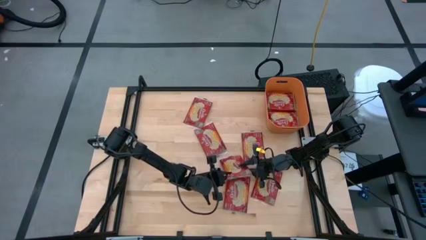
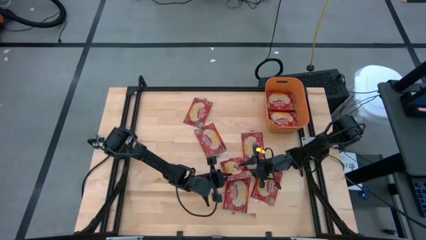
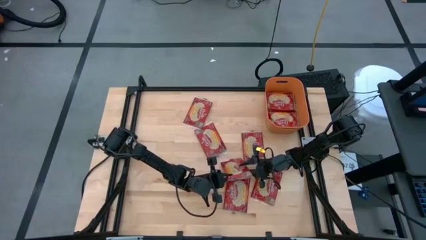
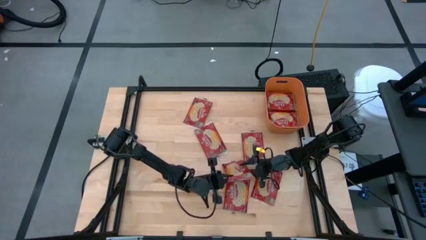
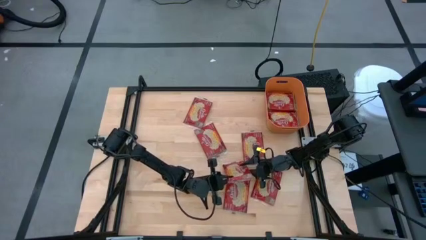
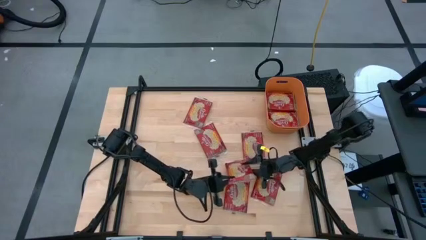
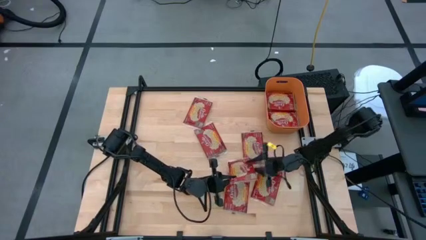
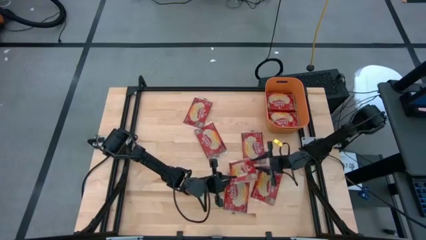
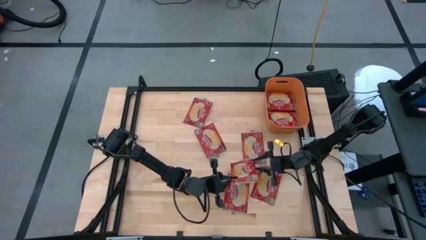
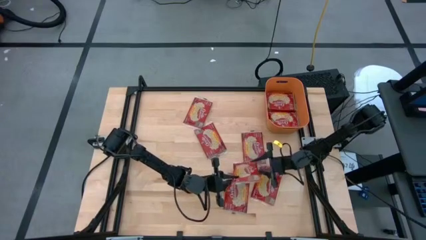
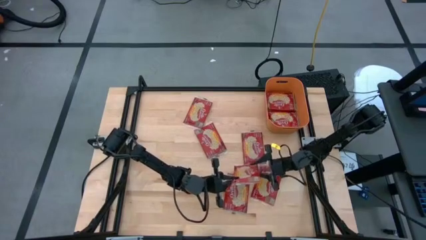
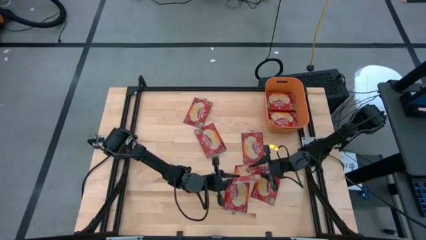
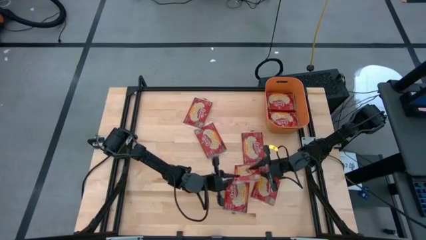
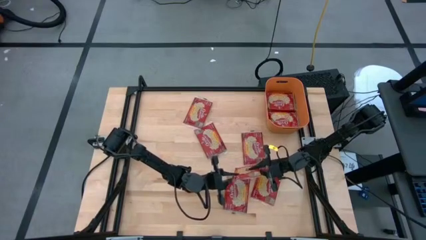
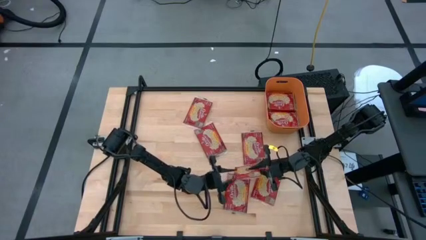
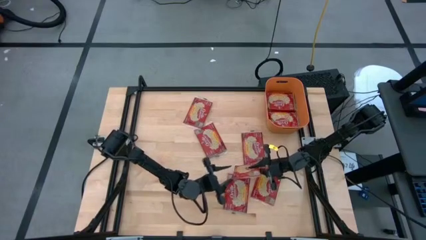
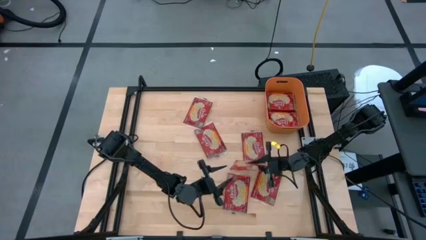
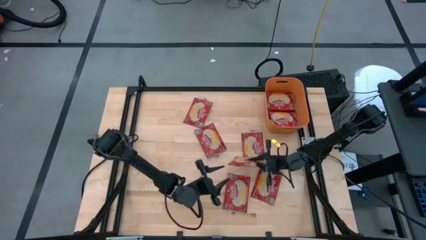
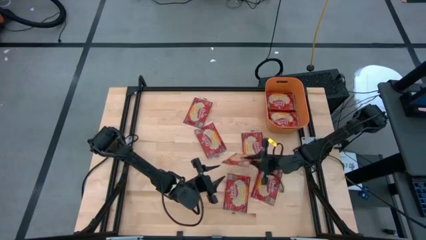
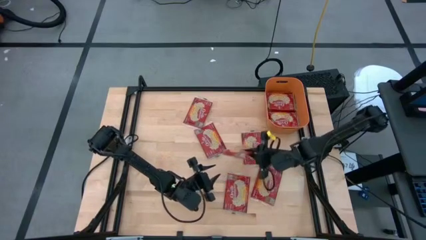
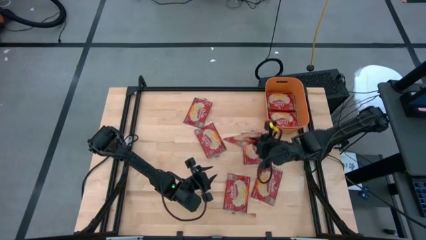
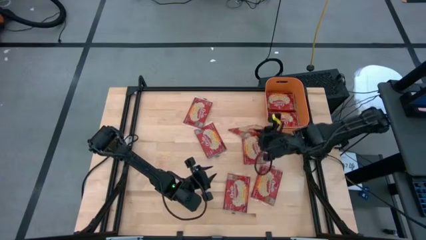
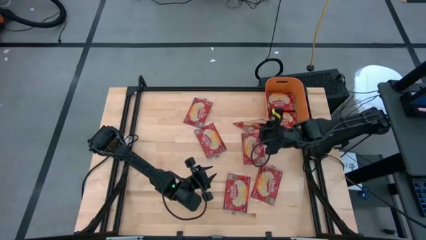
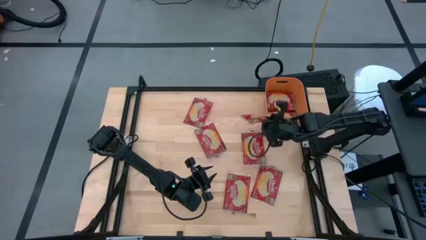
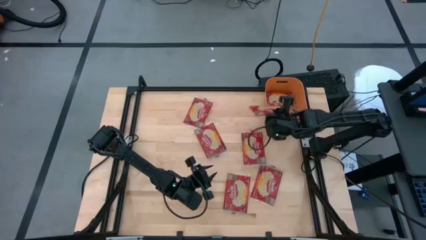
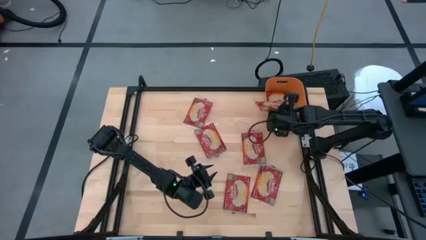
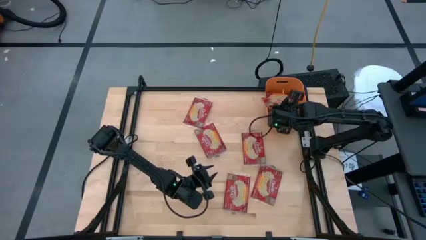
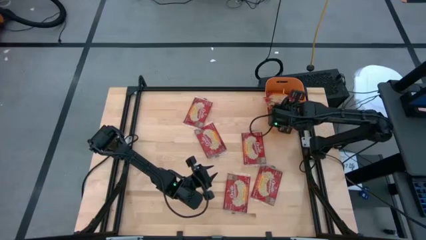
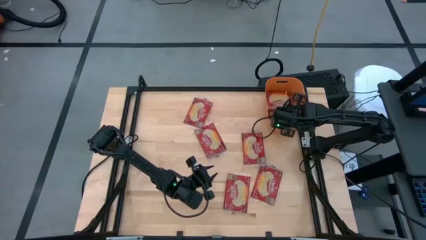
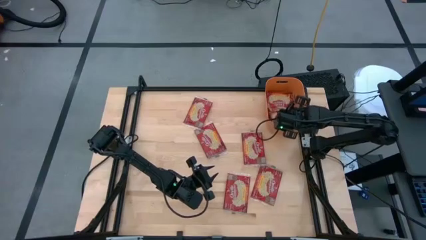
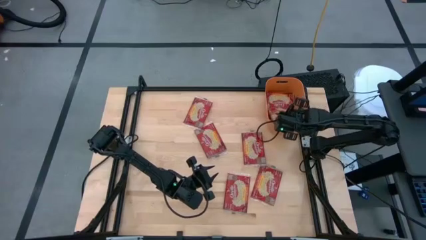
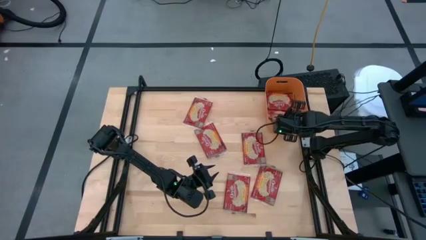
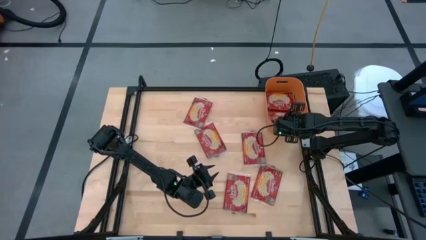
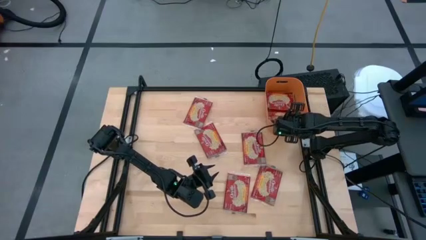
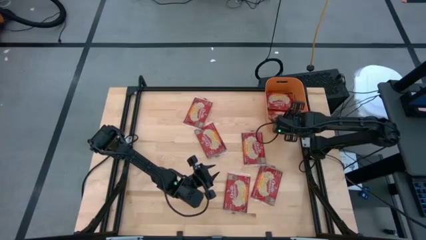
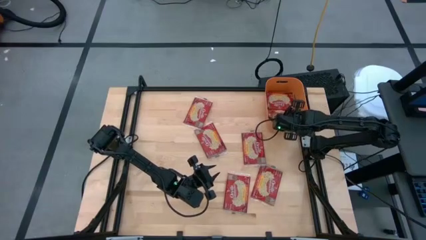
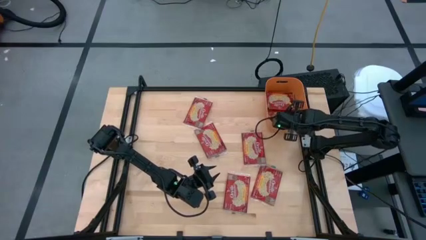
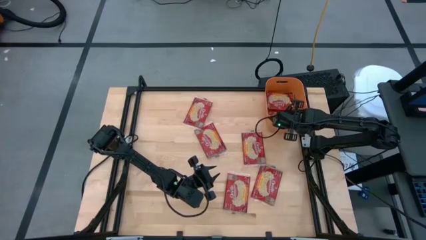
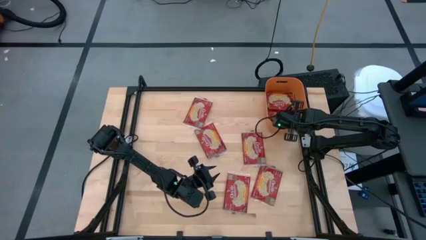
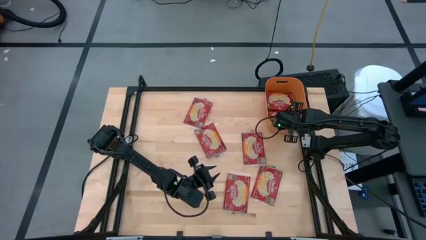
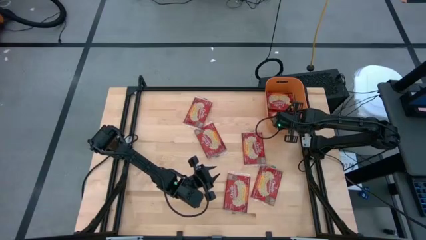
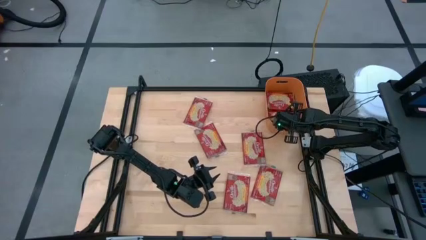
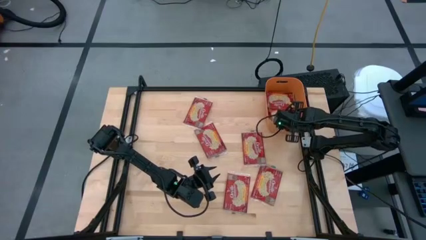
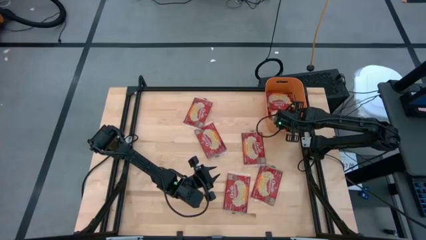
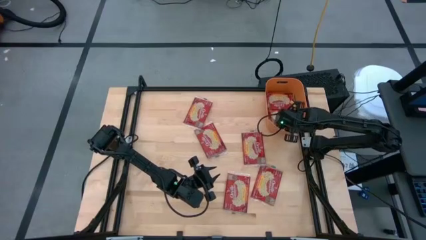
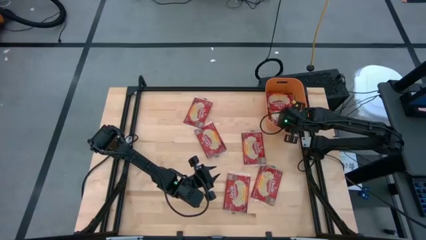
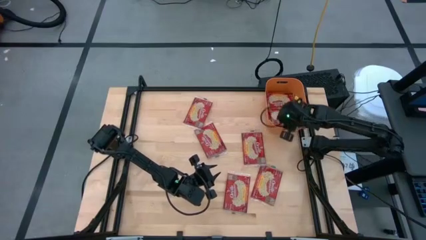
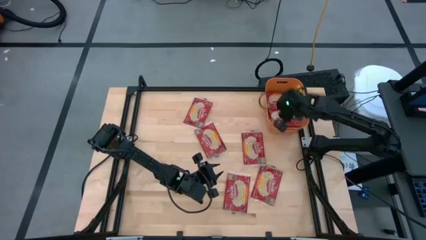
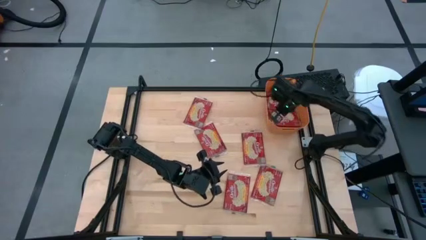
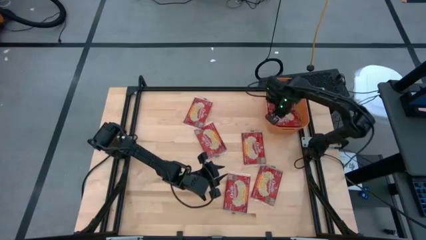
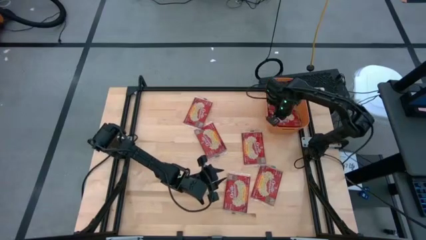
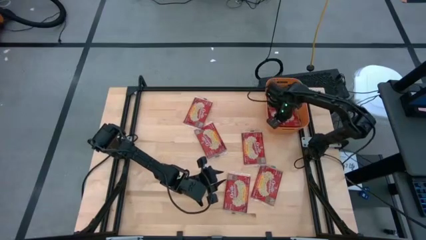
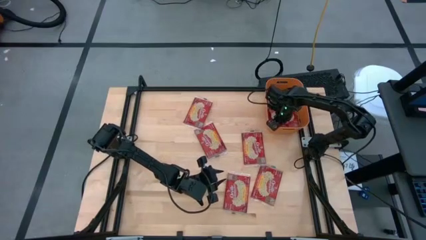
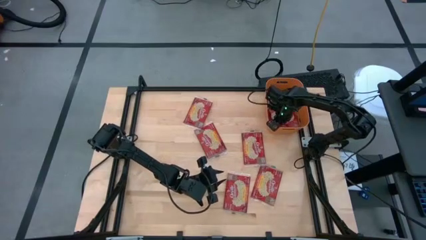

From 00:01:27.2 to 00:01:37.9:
Task: Sort popcorn bags into baskets
Put the red popcorn bag into the orange container

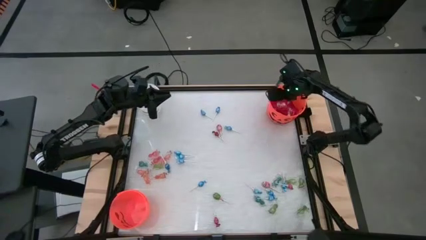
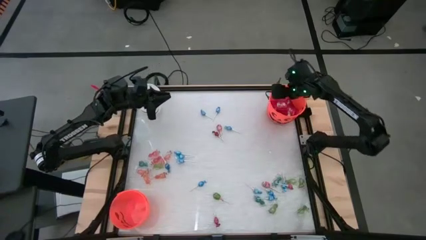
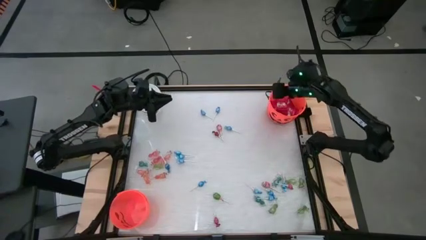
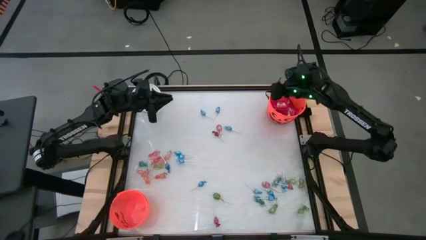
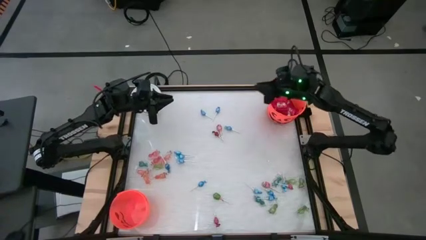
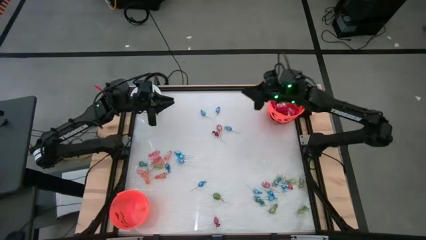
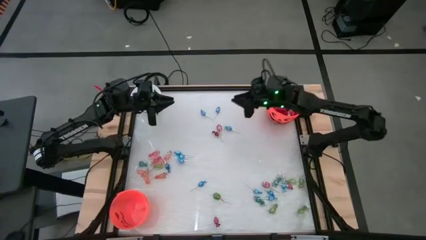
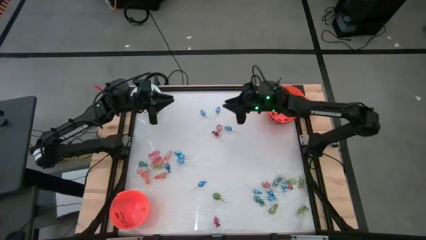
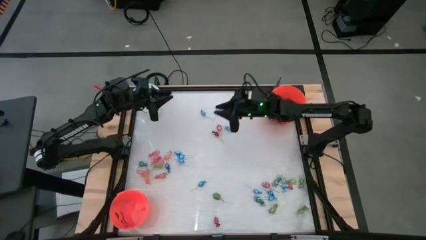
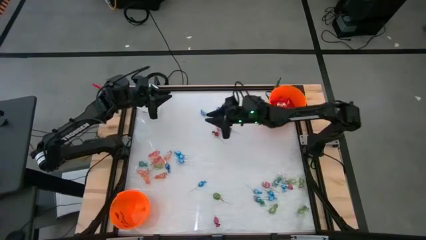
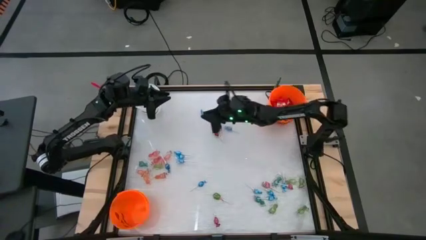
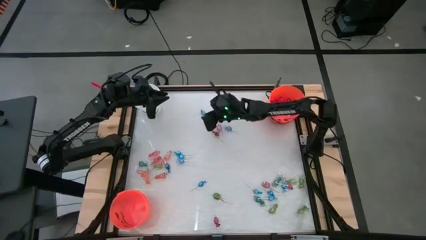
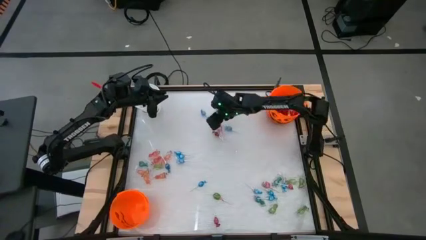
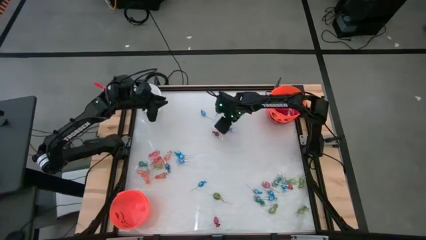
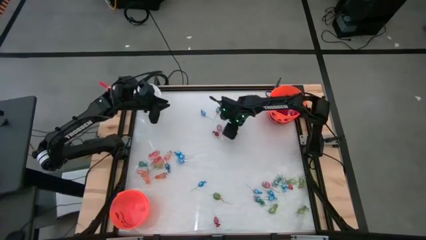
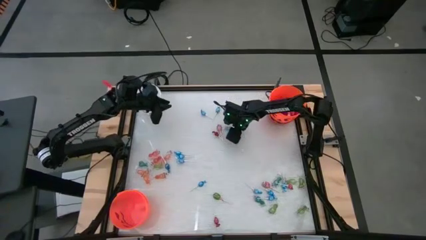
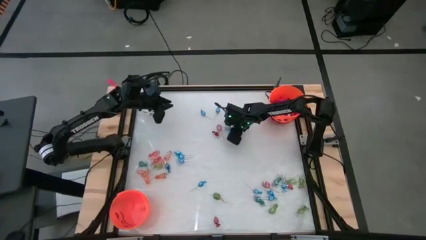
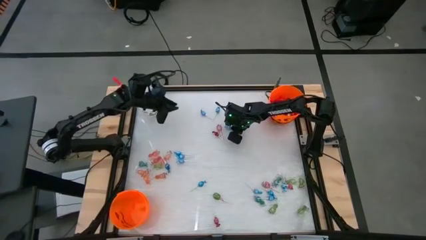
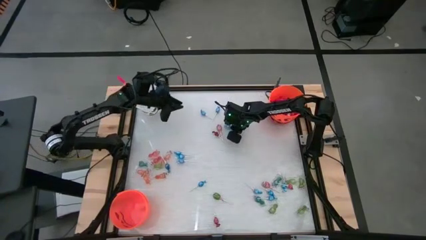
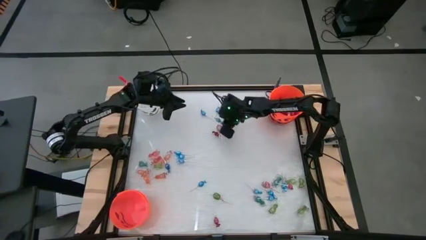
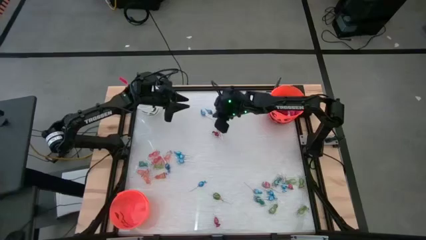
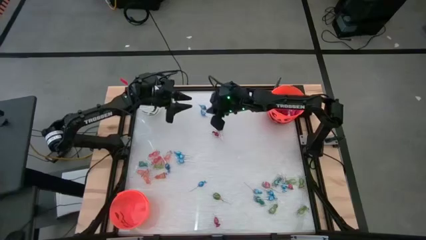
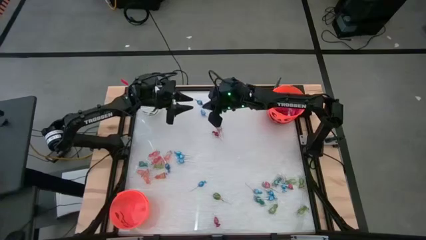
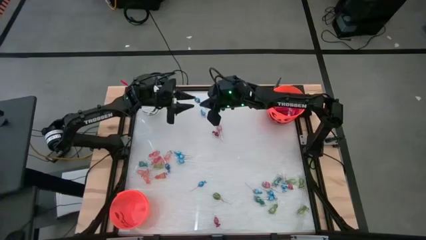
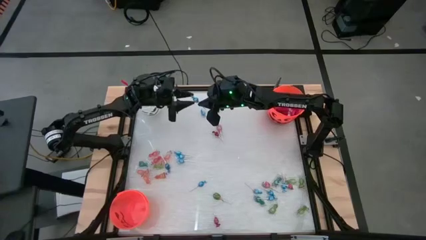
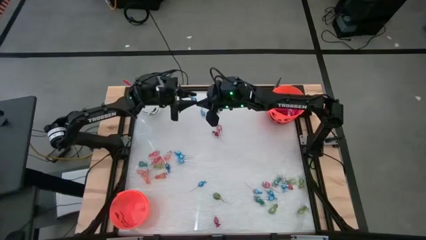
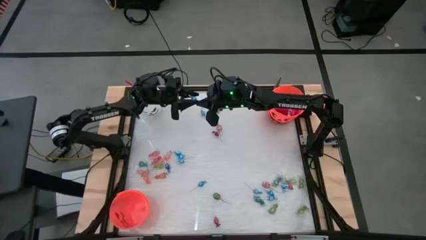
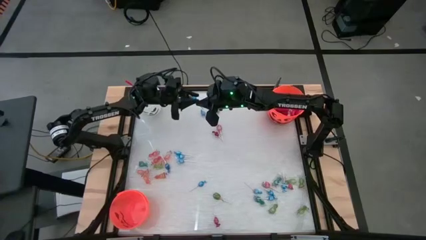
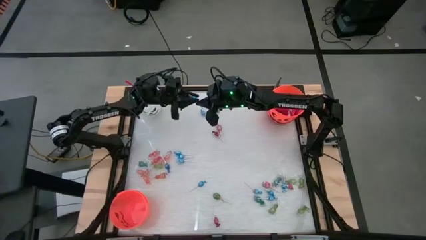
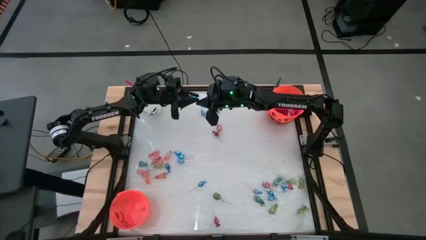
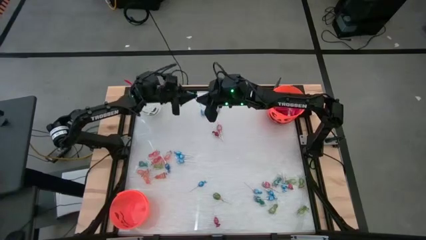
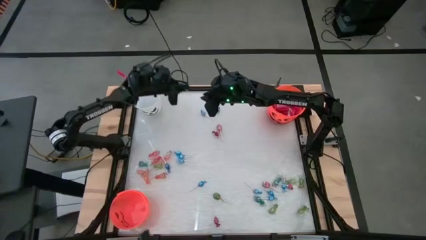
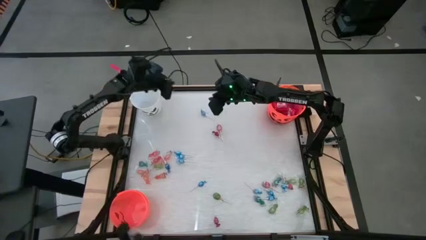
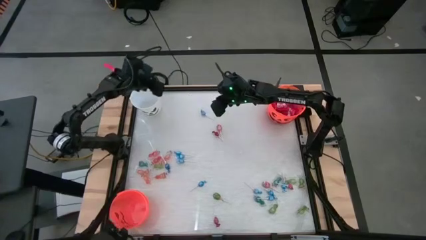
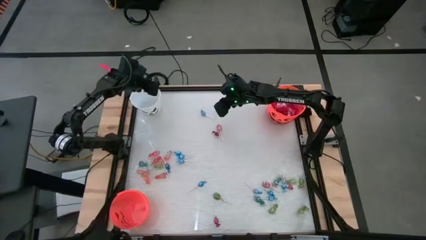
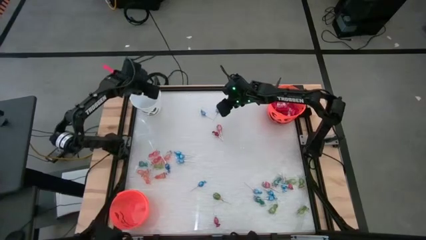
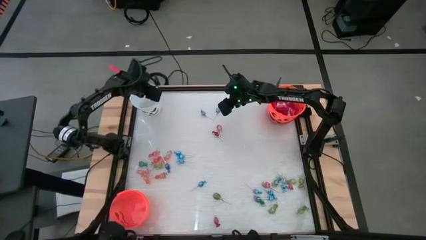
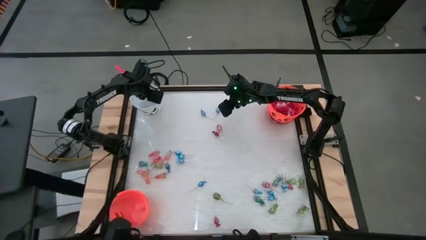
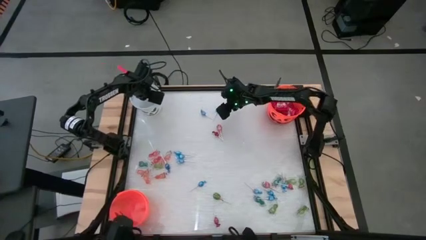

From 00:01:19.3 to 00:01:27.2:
Task: Sort candy by brand, put in halloween buckets
Put the blue lollipop into the white bucket
